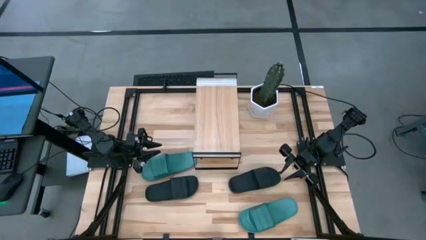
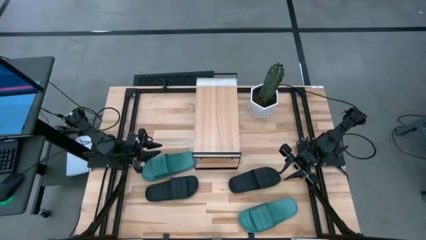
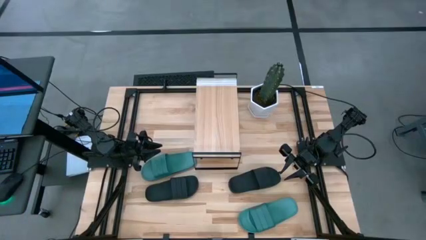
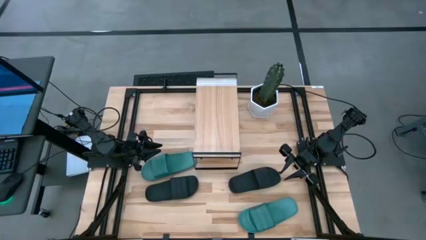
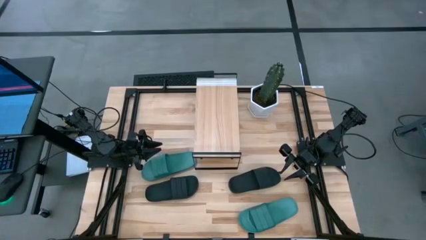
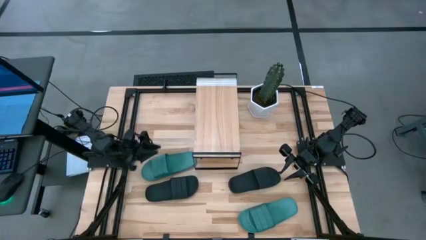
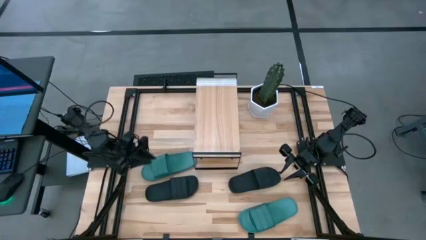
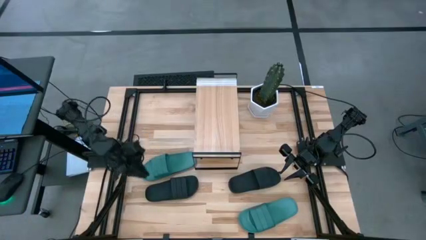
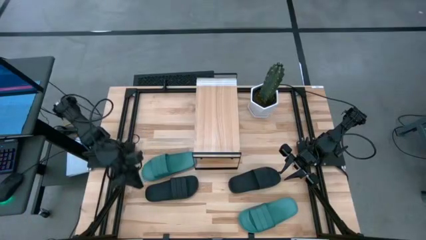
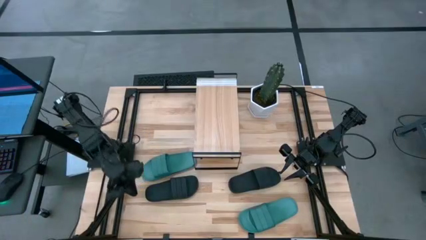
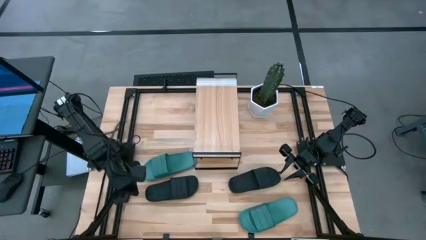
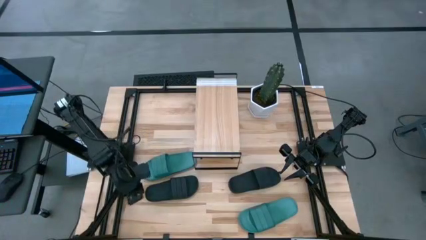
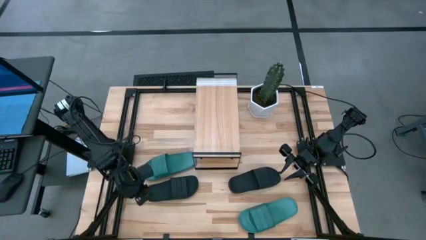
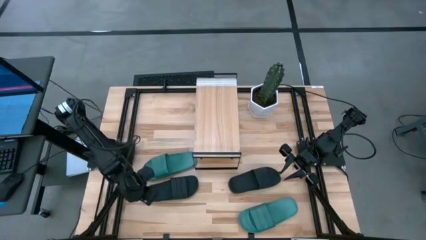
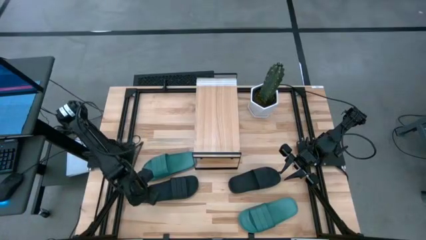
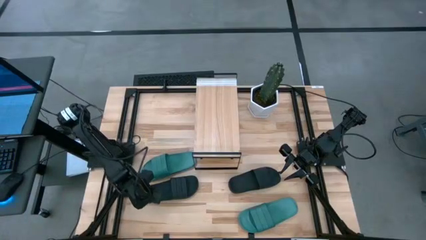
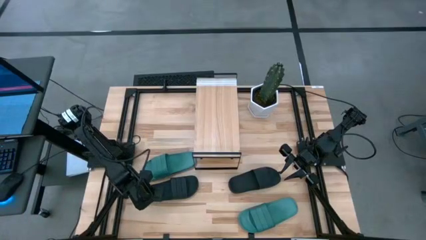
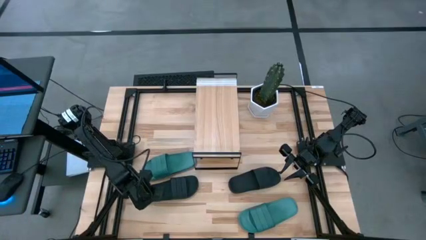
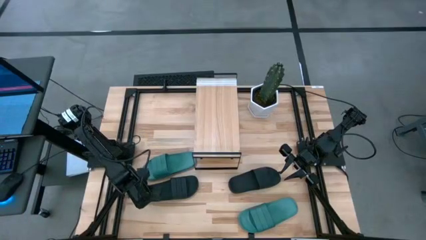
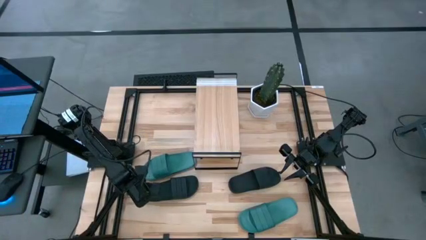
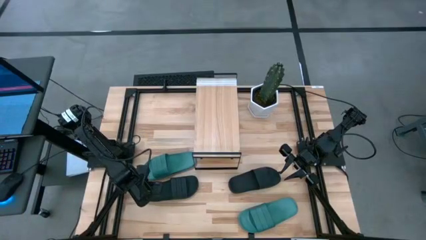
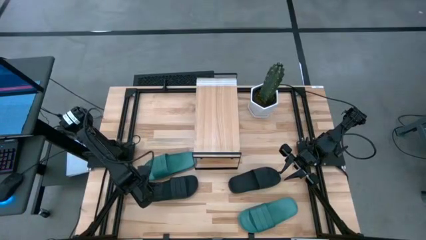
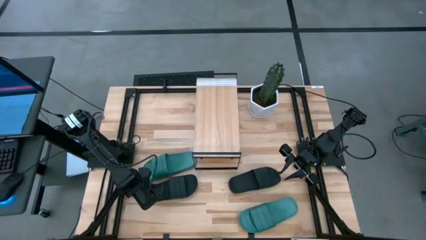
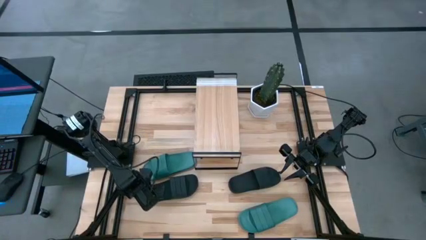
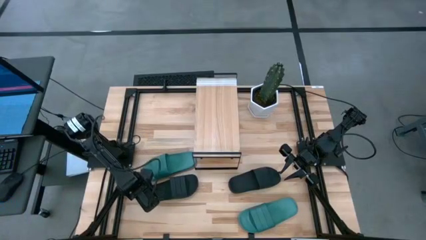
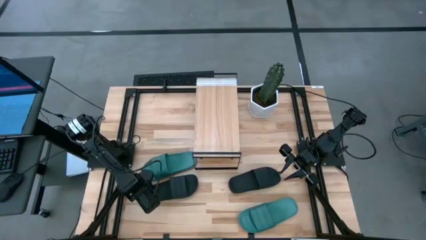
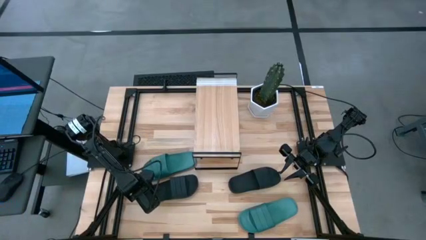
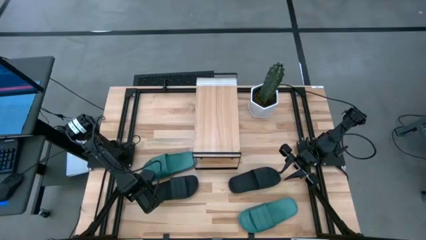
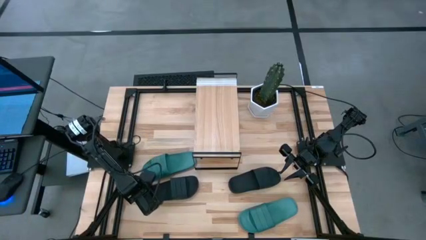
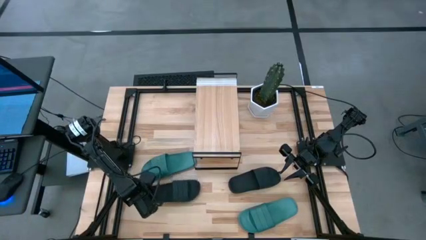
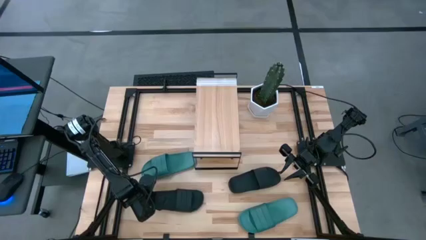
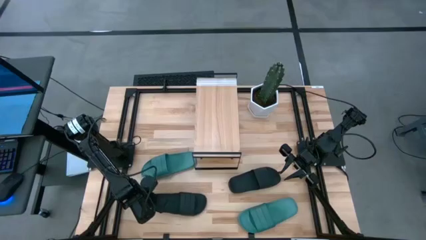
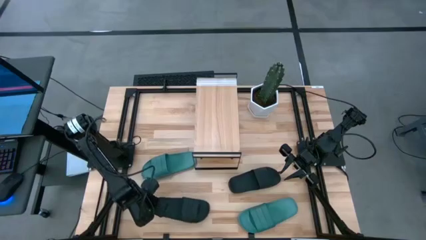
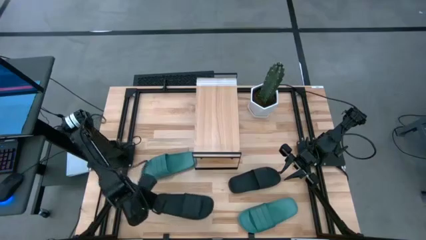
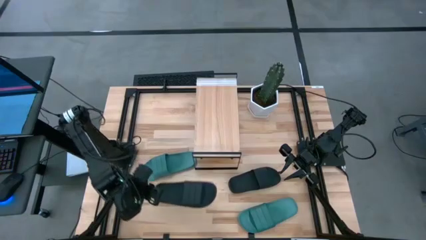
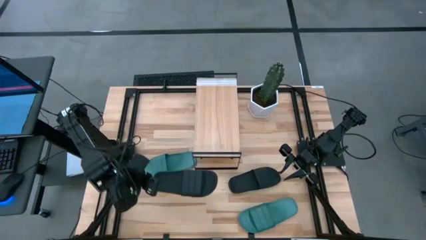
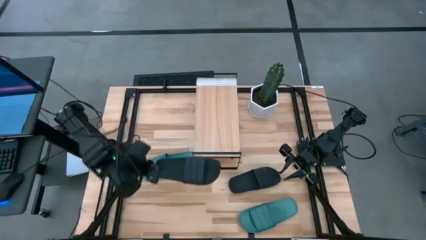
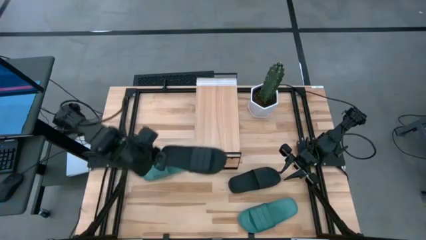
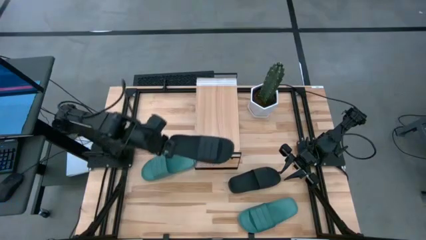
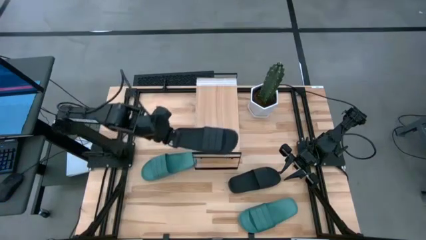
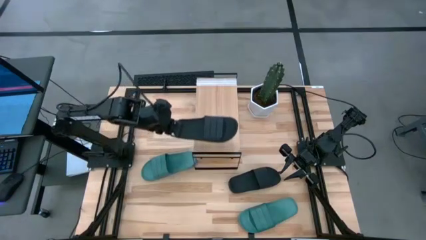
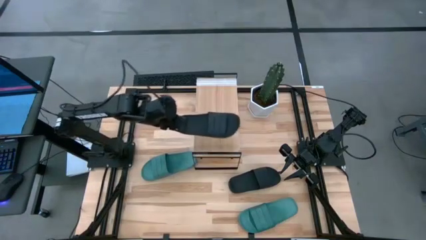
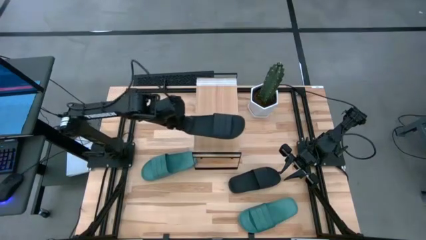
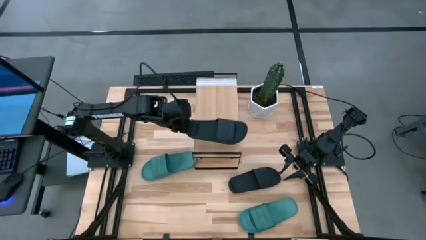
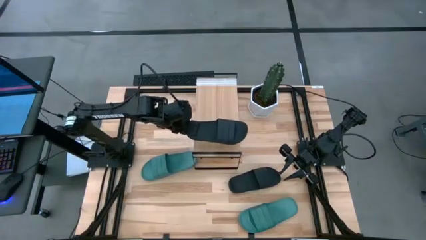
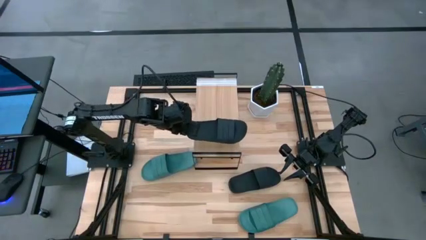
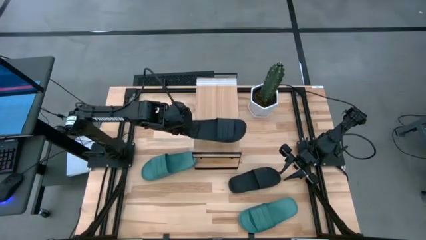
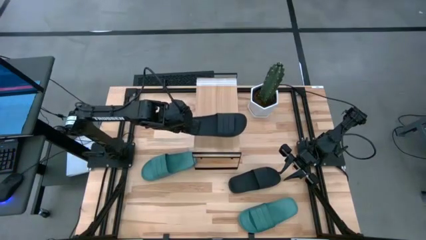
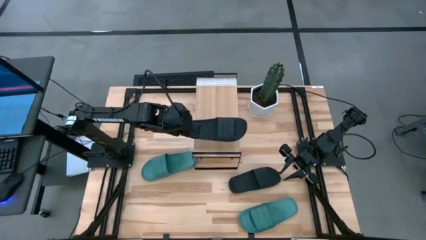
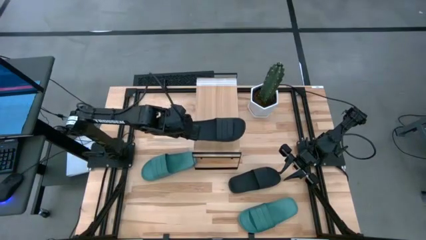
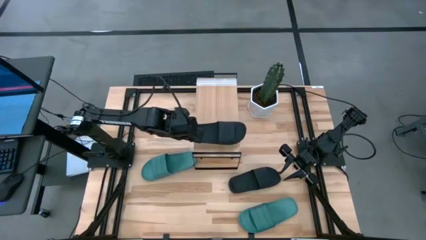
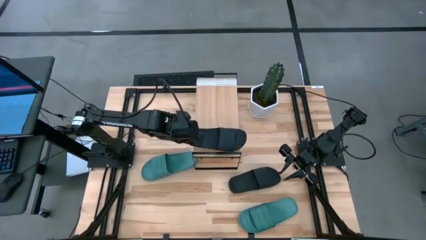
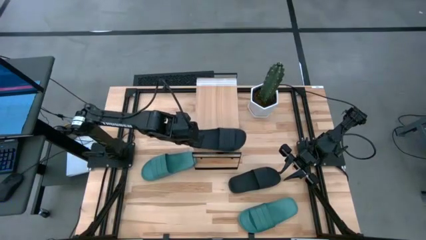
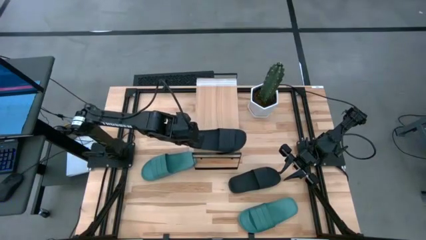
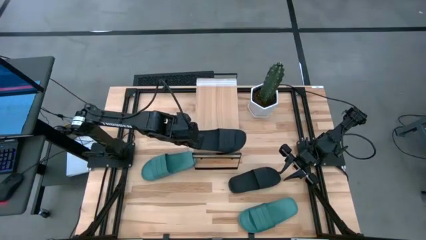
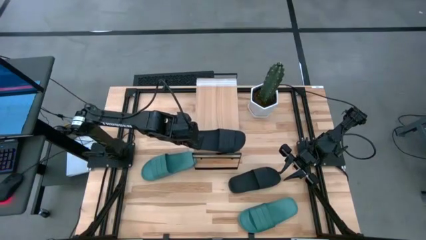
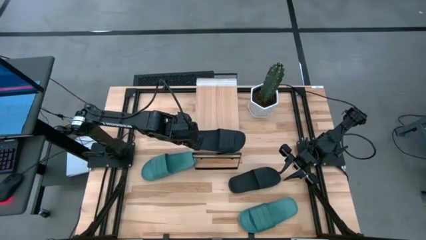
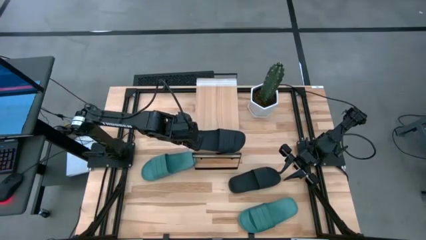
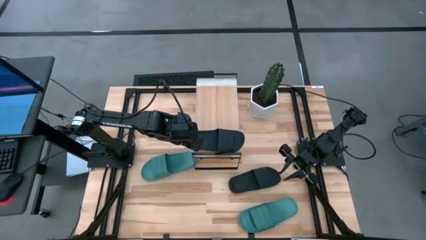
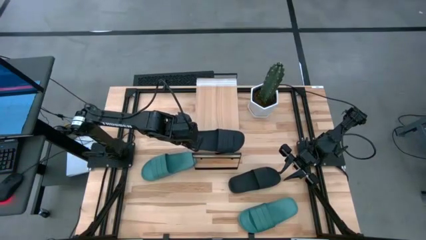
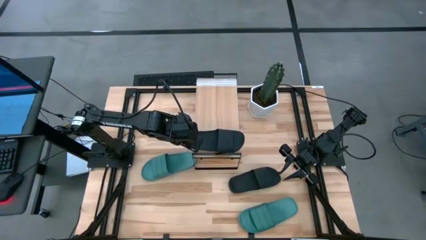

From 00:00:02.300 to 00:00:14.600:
Task: Pick and place slides into the shelf
Put the left black slipper on the shelf
